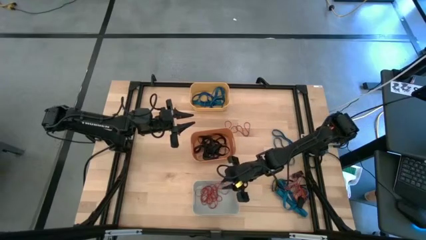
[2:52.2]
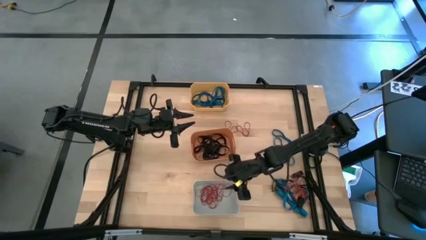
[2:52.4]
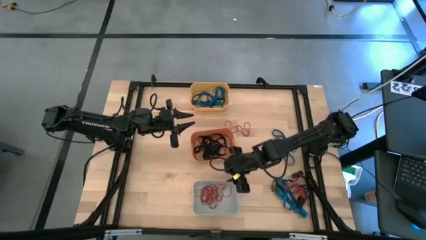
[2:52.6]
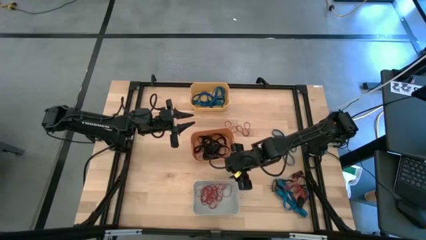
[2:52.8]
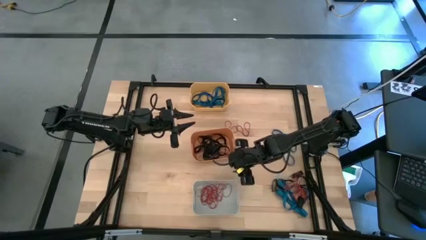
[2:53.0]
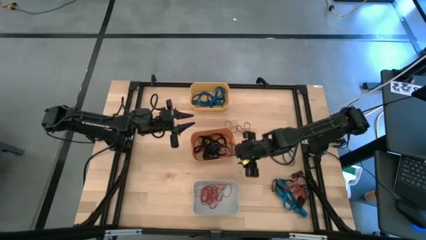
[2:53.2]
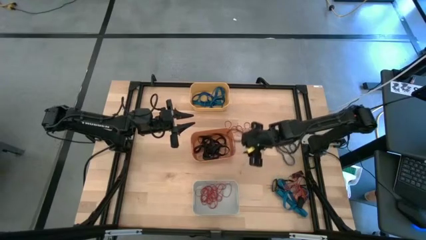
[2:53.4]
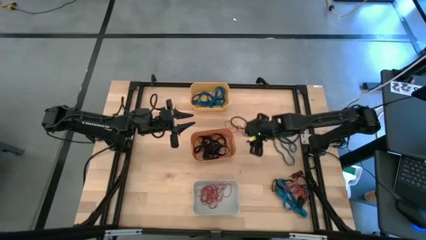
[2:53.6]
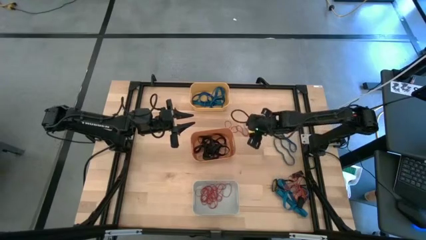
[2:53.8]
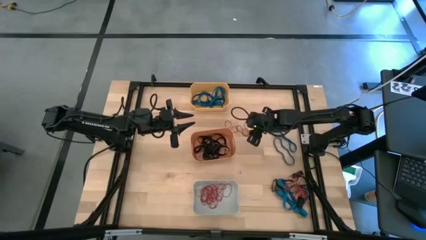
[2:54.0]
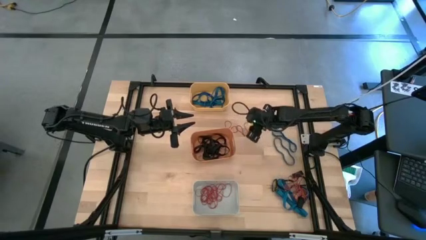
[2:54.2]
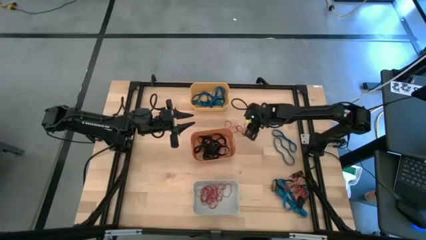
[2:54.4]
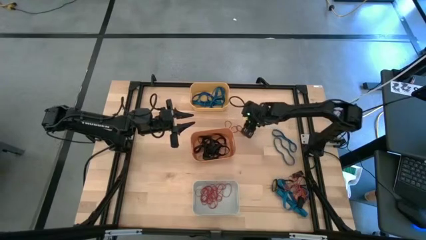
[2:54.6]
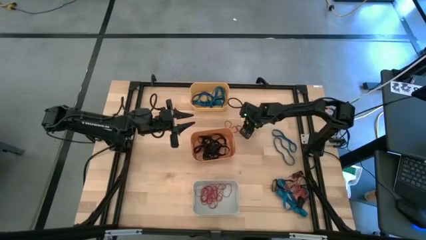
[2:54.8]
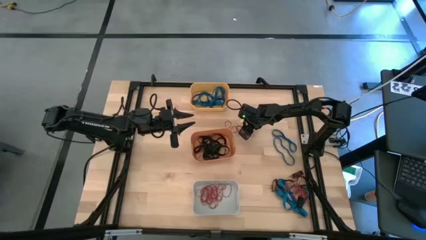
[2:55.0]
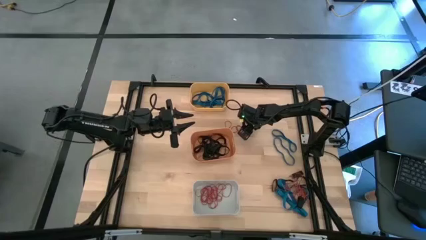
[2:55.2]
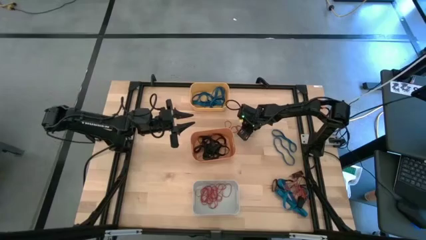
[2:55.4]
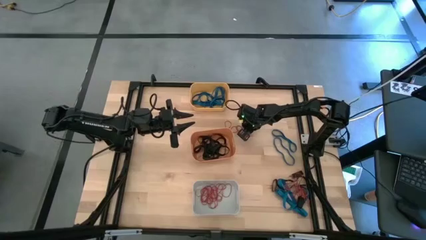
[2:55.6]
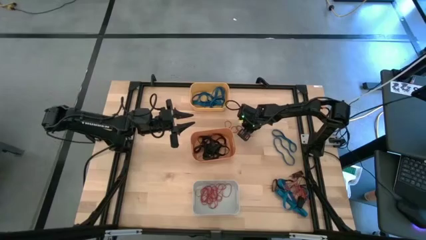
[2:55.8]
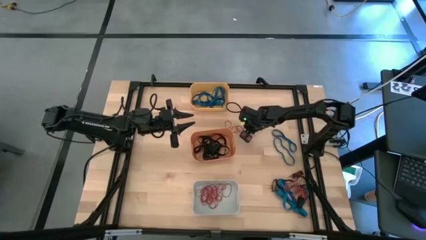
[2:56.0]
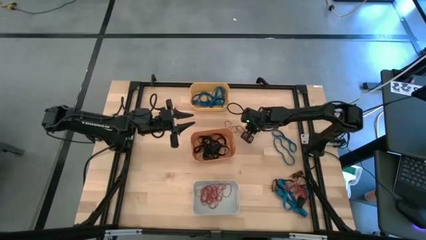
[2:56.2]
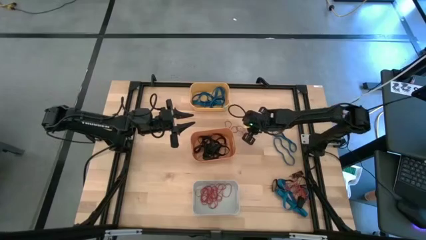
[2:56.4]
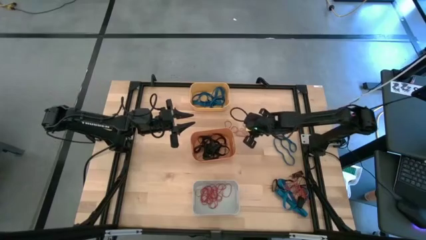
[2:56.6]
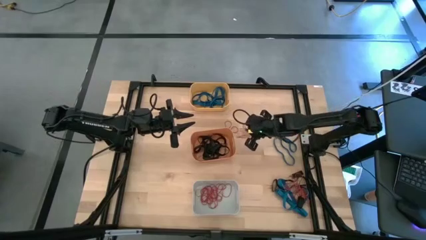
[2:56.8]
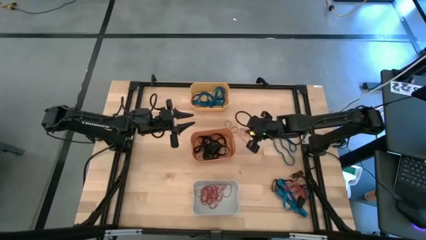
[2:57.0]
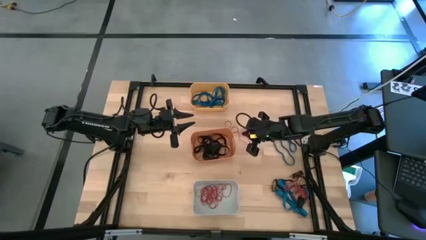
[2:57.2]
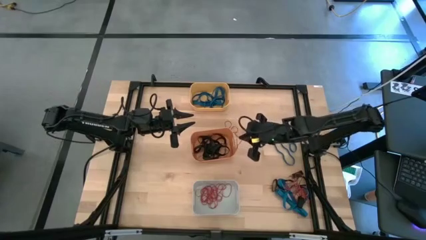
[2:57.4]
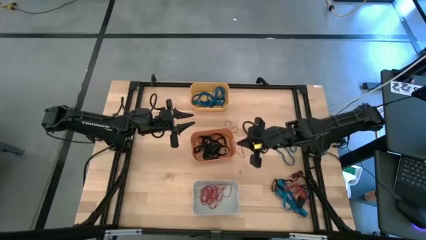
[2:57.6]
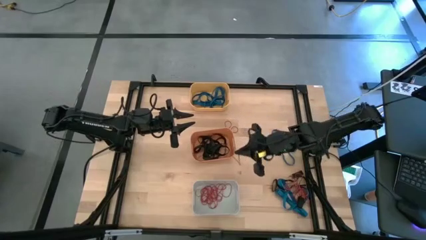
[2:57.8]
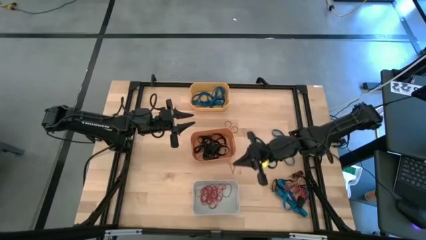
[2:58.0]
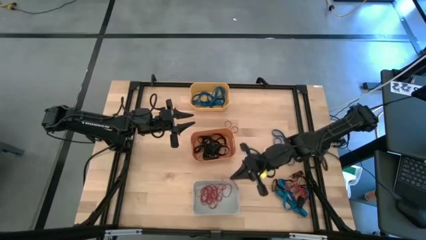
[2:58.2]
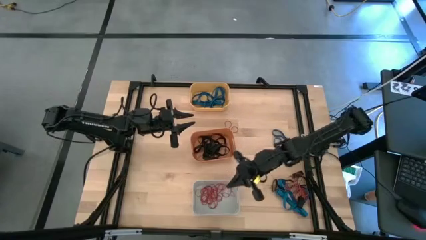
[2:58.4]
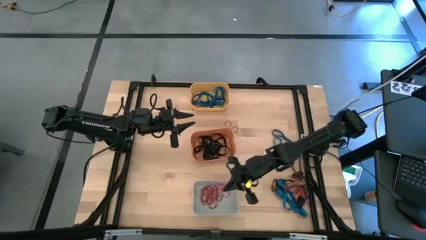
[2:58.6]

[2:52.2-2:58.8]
Task: Sort rubber bands into baskets
Put the red rubber band in the white bin

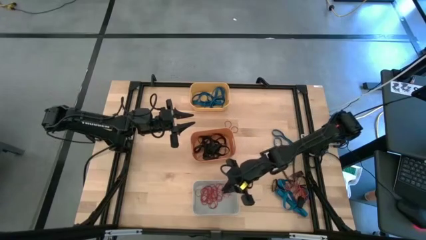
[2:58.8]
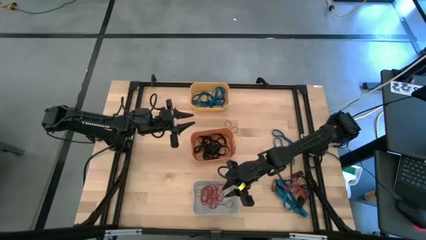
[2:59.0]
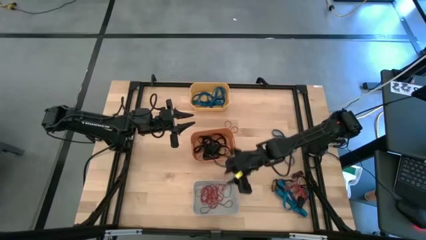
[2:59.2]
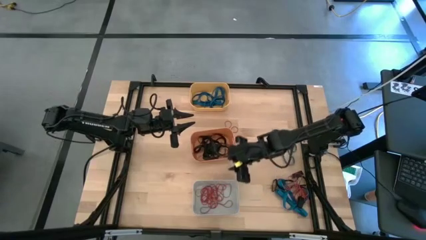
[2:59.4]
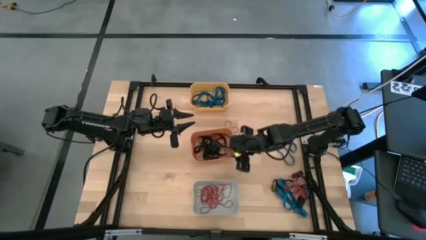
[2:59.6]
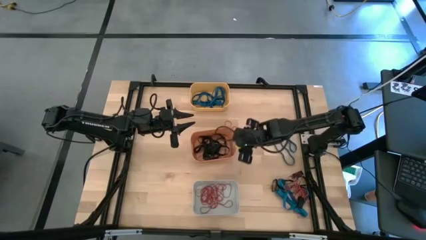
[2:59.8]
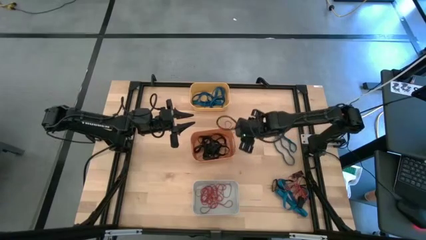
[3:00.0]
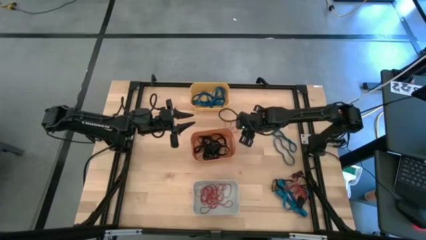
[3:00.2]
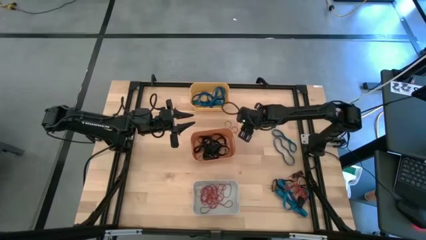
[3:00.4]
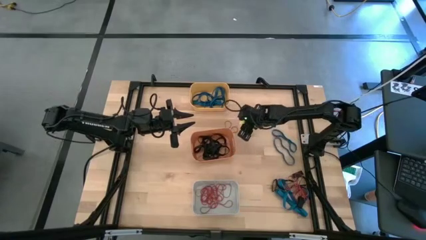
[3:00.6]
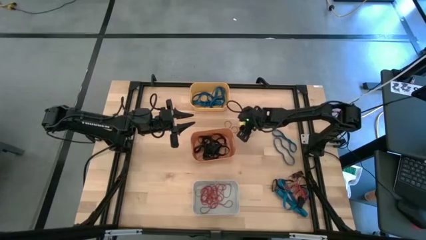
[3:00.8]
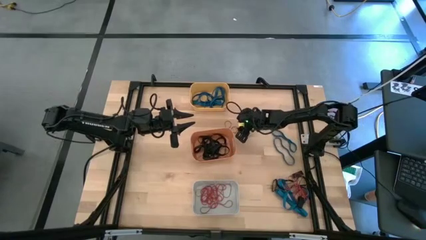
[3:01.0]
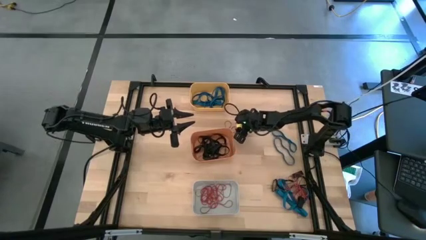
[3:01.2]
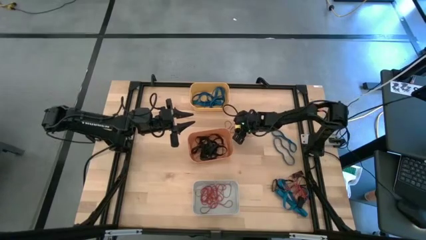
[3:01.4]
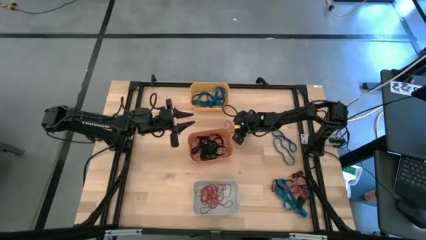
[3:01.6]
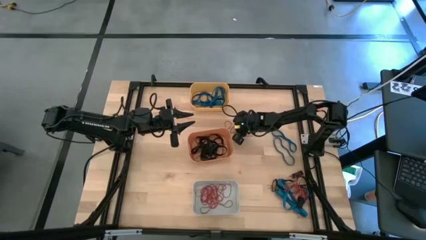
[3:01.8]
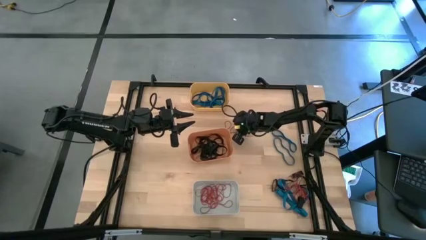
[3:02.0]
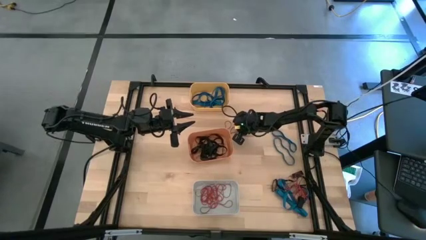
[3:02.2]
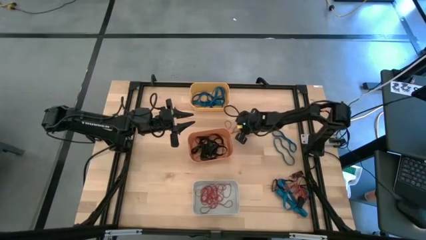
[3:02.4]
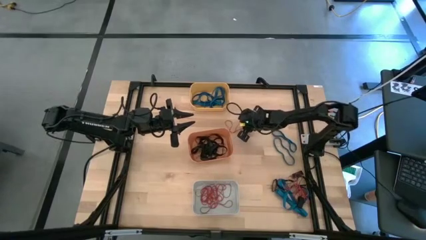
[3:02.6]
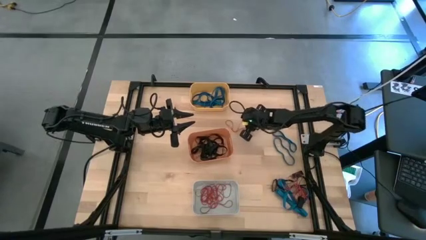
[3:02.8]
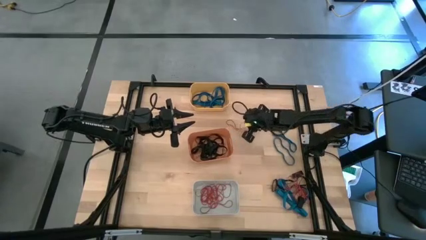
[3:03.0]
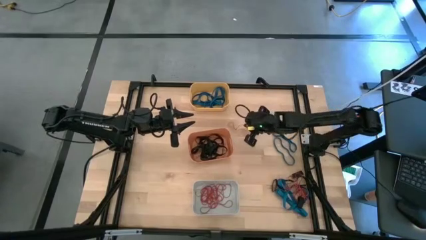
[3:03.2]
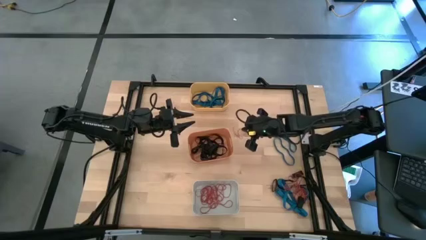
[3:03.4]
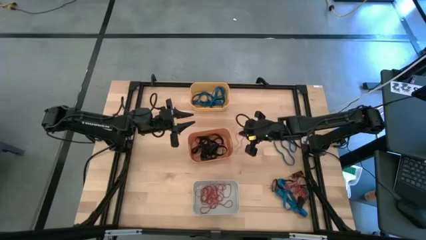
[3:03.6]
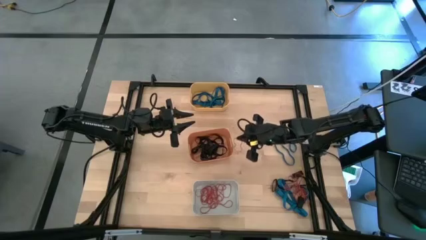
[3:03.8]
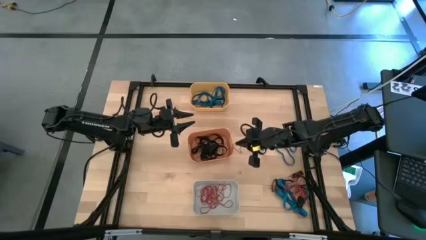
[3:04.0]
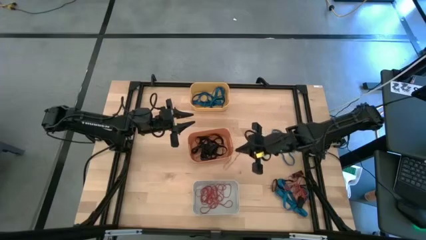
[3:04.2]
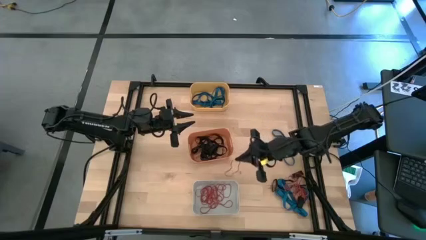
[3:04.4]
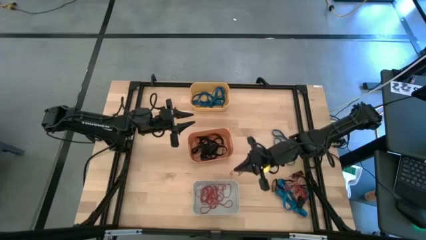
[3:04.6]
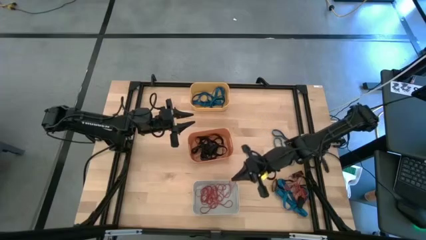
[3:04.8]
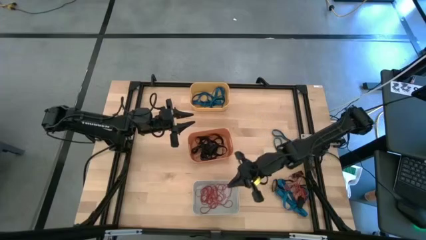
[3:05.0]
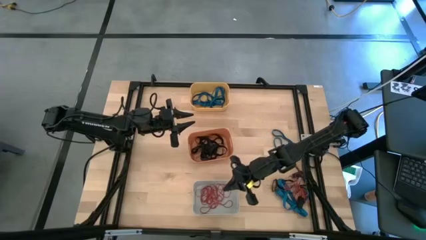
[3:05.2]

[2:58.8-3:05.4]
Put the red rubber band in the white bin

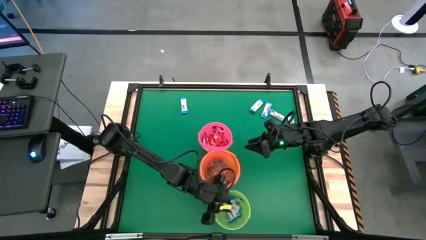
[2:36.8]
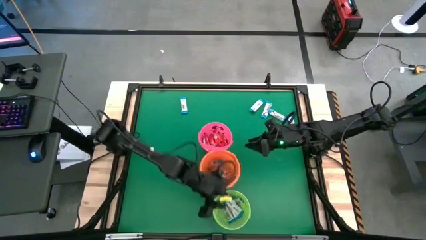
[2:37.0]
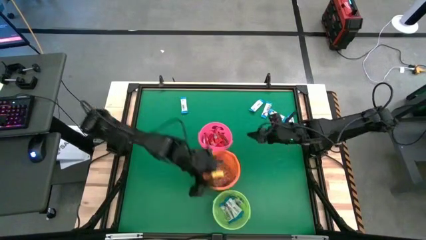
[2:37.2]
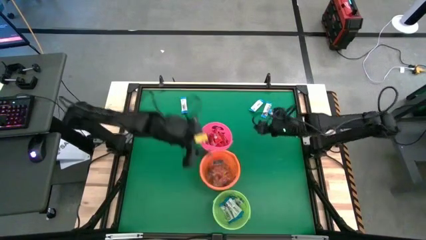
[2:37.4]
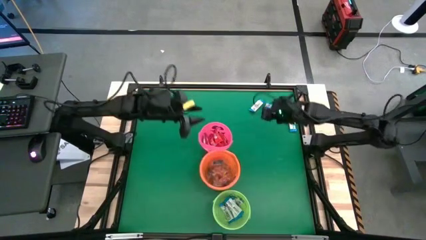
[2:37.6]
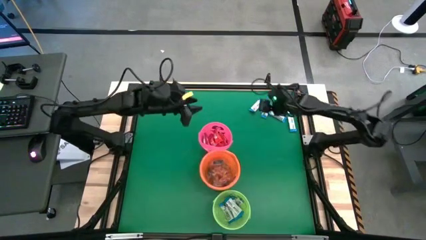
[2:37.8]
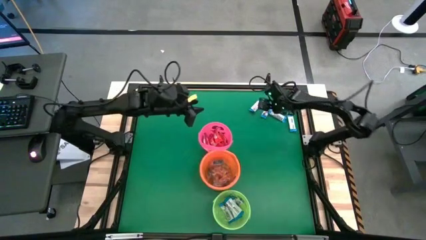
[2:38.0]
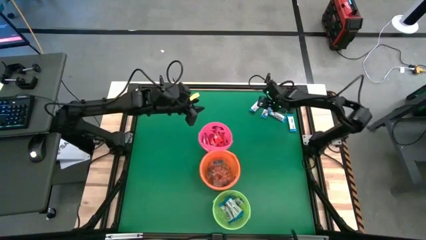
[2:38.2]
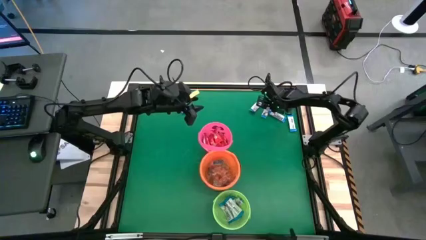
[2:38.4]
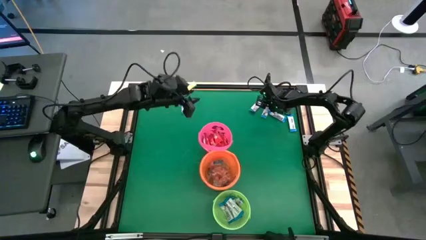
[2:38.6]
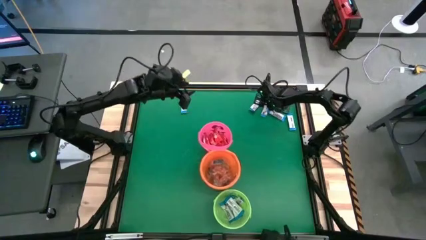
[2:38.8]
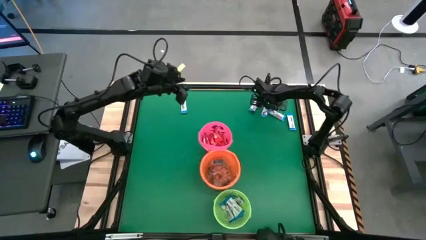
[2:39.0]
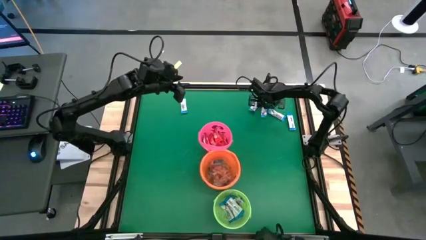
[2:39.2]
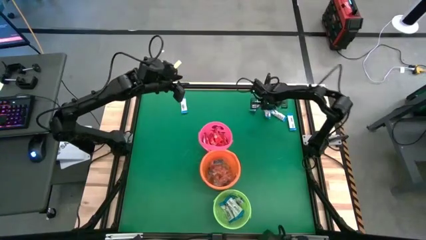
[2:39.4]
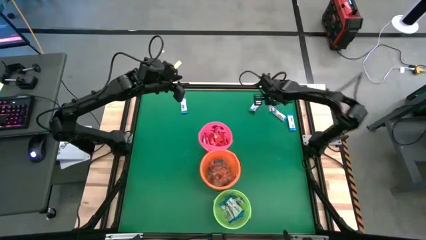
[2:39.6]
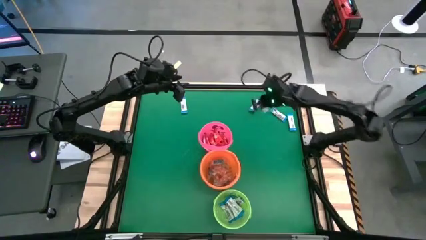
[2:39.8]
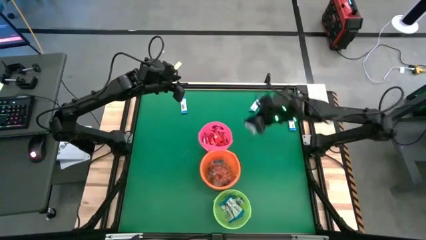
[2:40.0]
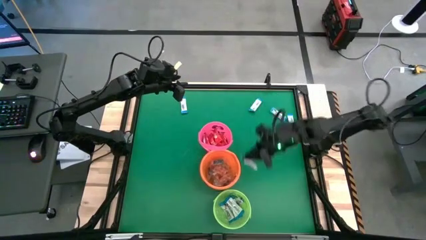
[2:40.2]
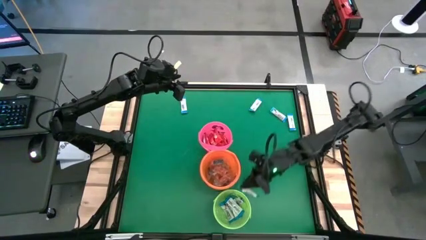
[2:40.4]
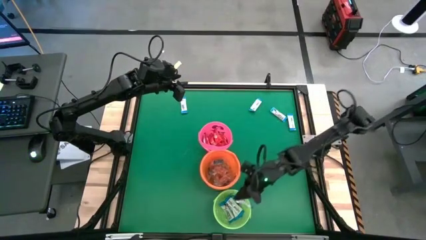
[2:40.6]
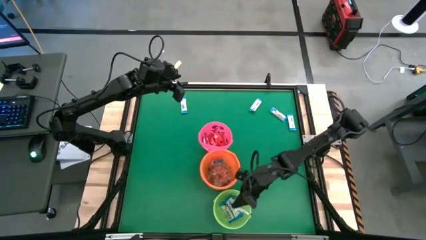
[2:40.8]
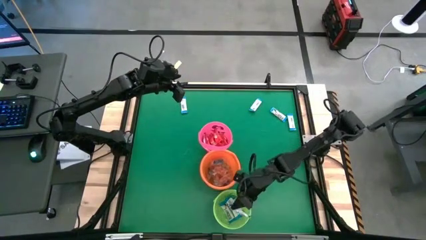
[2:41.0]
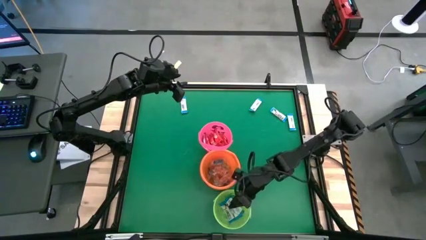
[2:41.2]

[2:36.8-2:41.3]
Task: Sort candy by brand, put in halloween buckets
Put the white chocolate into the green bucket
